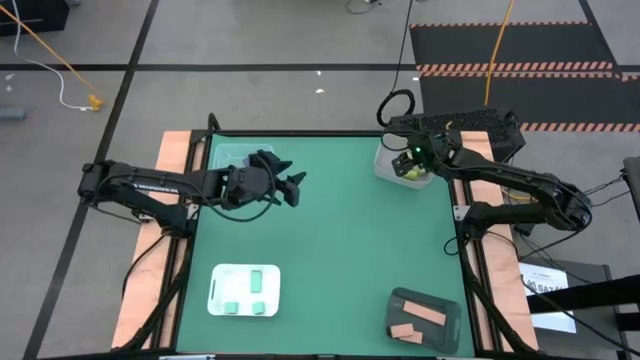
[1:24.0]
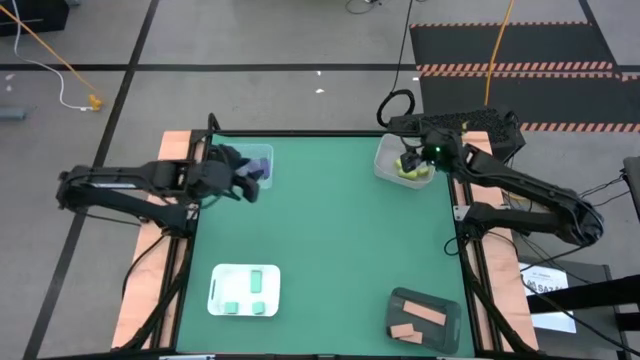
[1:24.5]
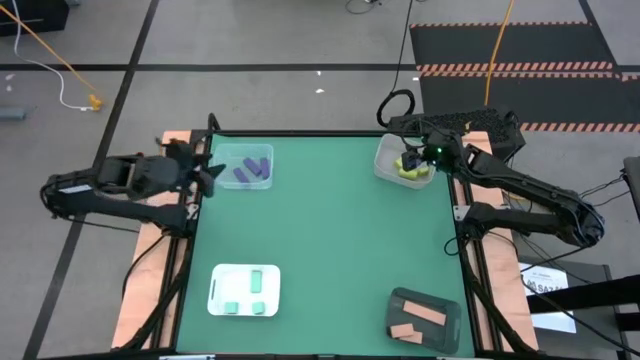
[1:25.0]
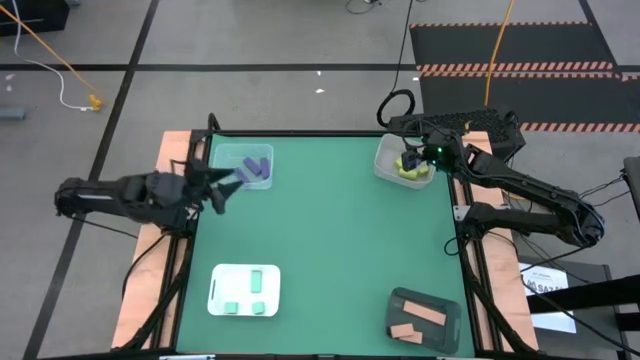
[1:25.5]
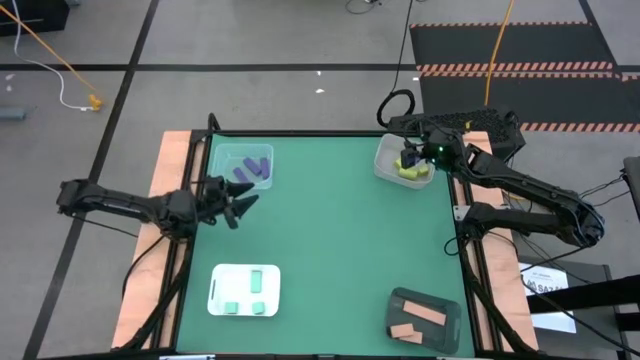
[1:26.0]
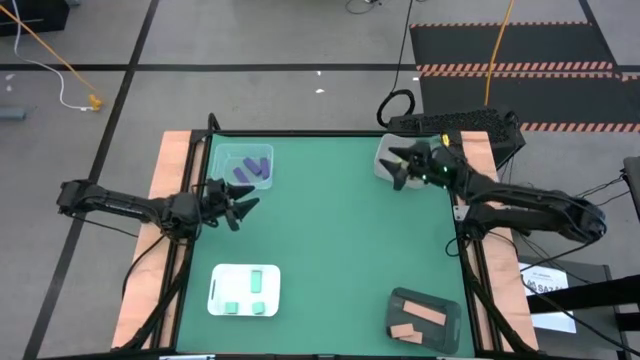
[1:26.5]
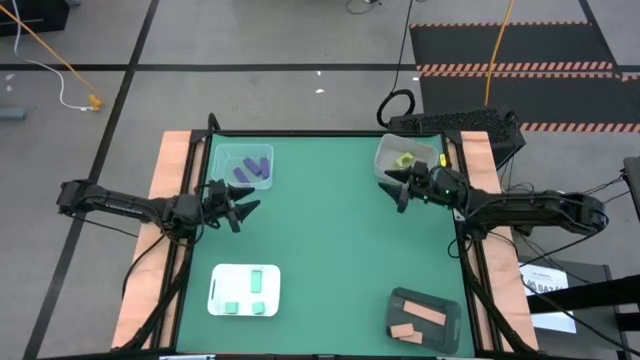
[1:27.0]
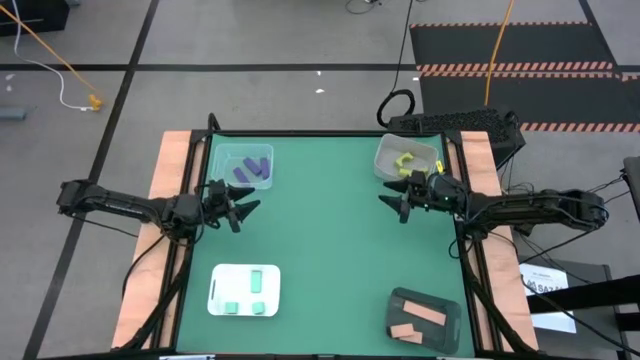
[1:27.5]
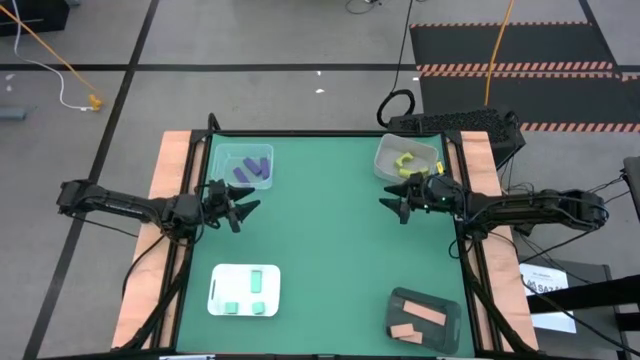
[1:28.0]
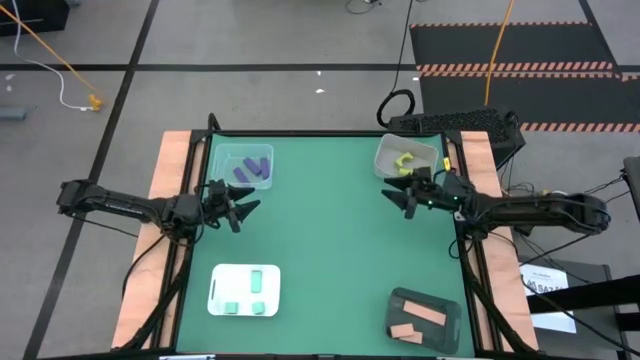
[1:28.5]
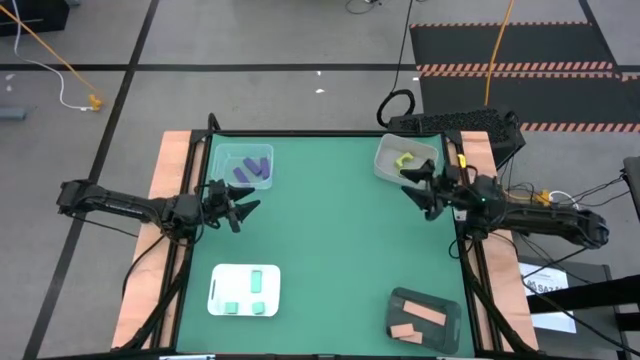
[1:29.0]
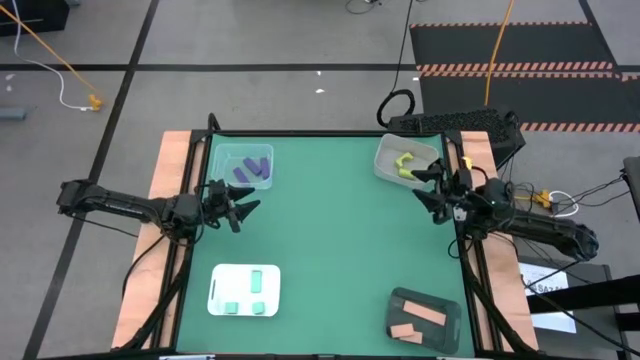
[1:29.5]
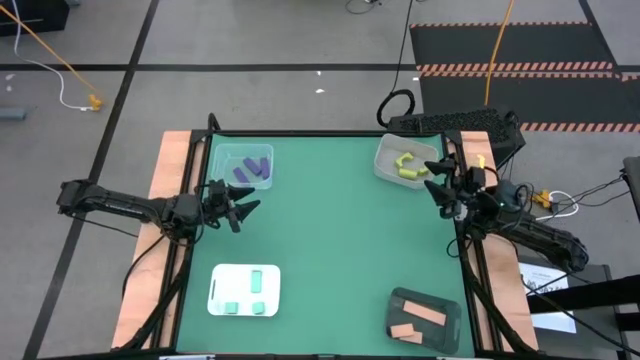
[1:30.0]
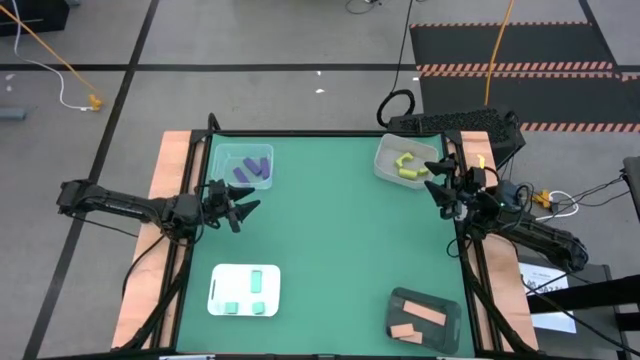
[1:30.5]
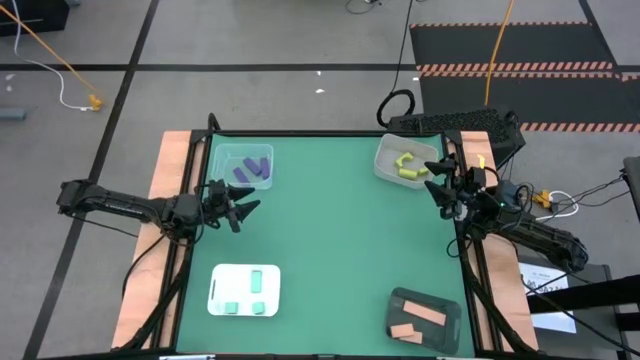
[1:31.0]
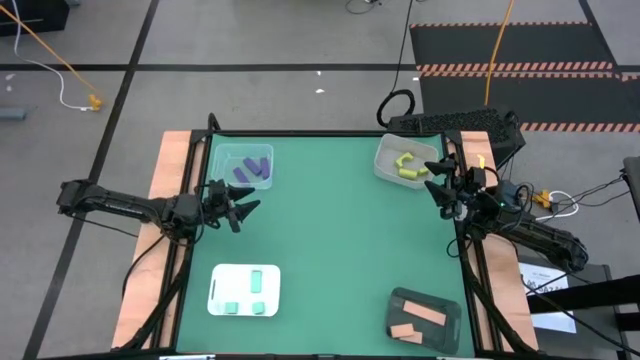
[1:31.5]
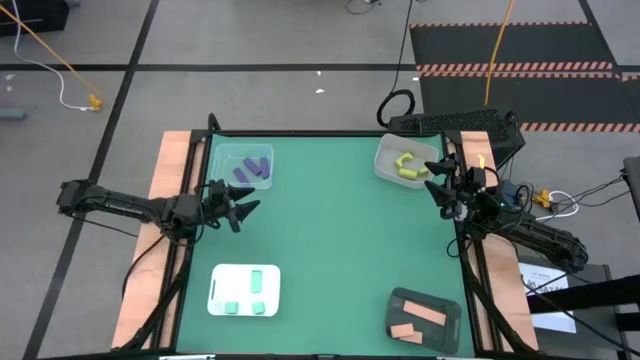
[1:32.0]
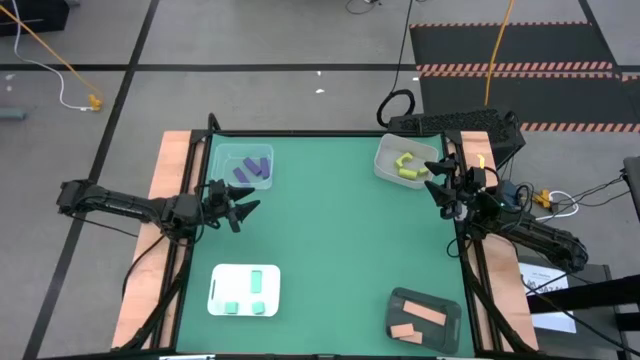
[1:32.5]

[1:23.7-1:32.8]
Task: Sort & place blocks by color
Return to Home Position

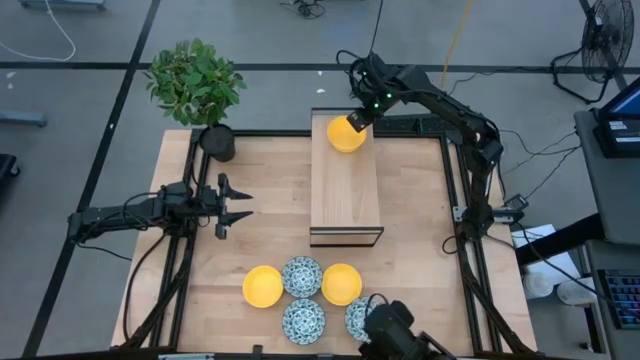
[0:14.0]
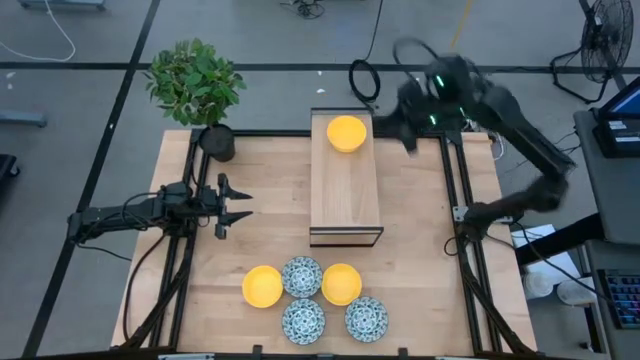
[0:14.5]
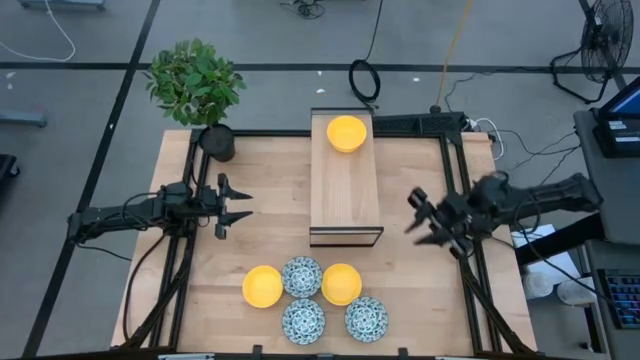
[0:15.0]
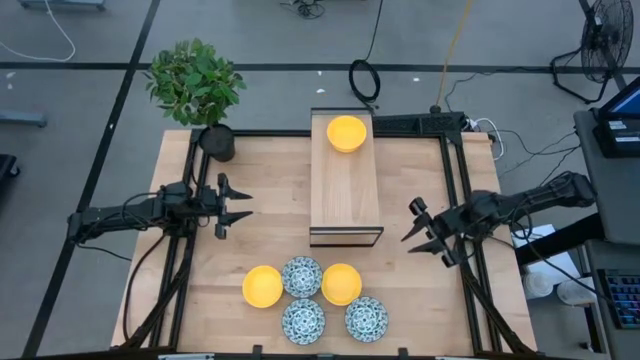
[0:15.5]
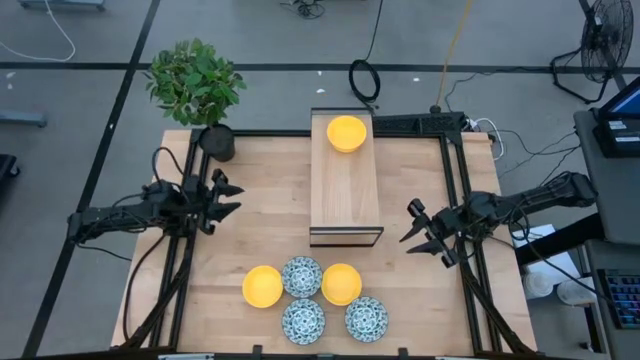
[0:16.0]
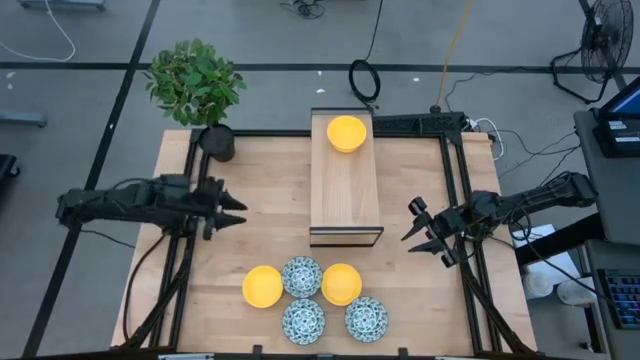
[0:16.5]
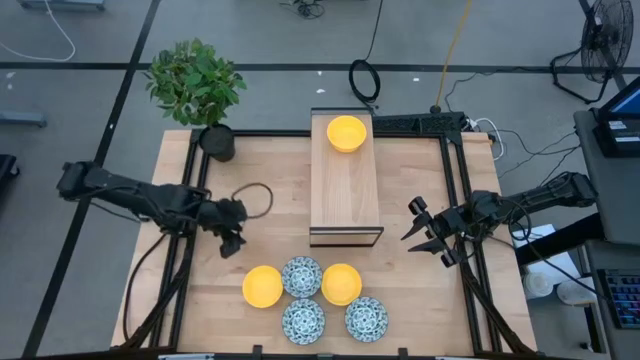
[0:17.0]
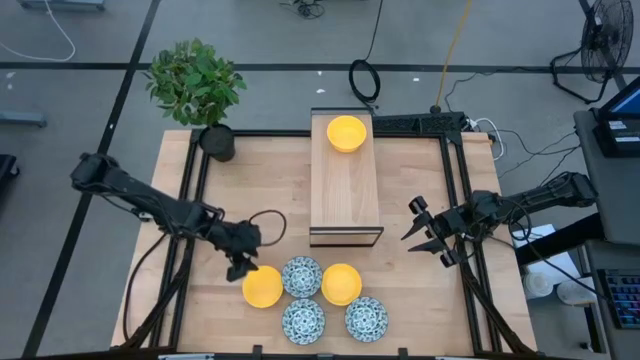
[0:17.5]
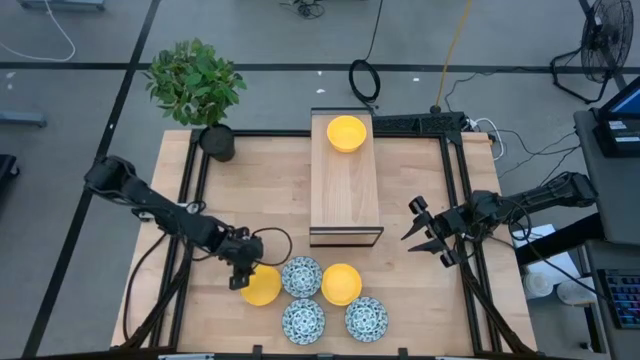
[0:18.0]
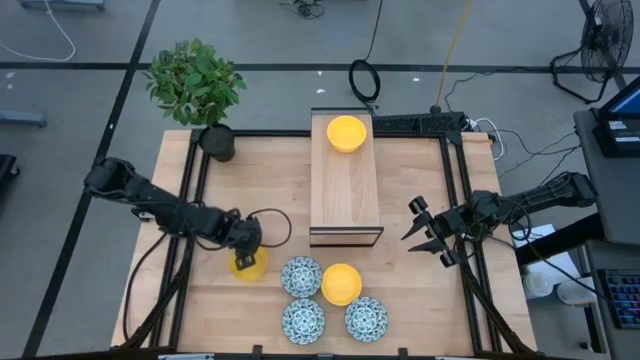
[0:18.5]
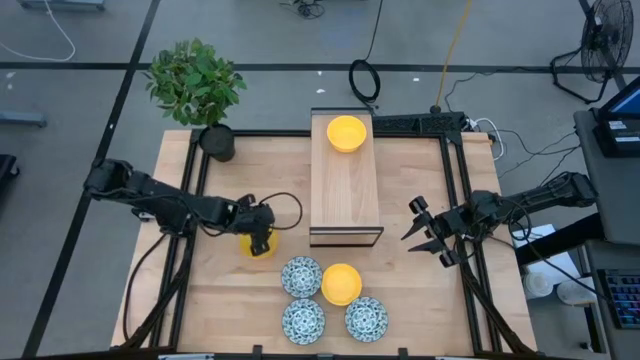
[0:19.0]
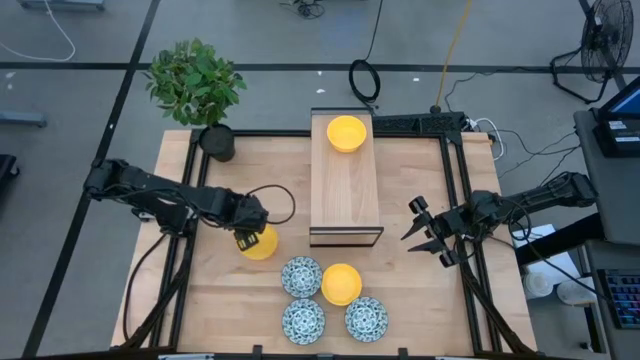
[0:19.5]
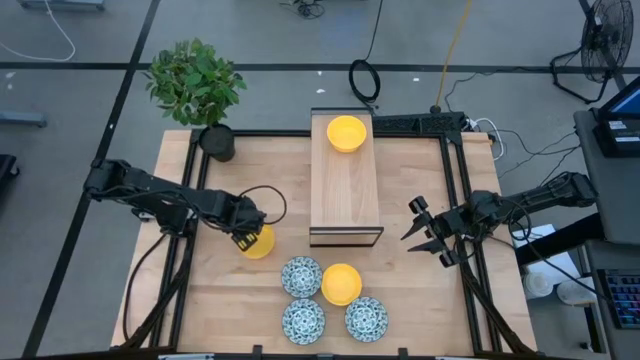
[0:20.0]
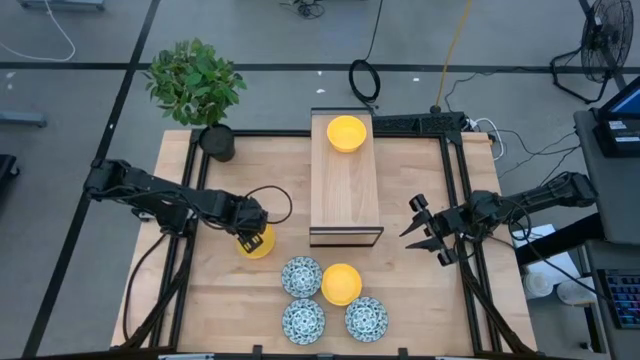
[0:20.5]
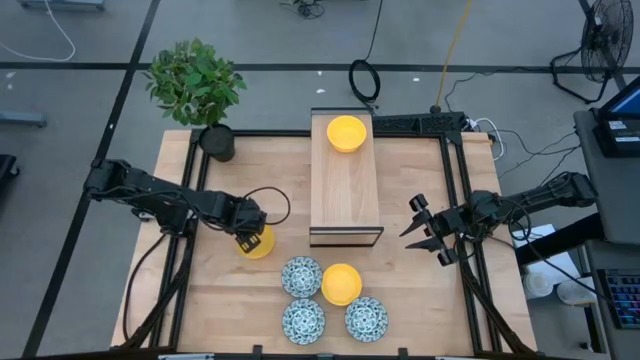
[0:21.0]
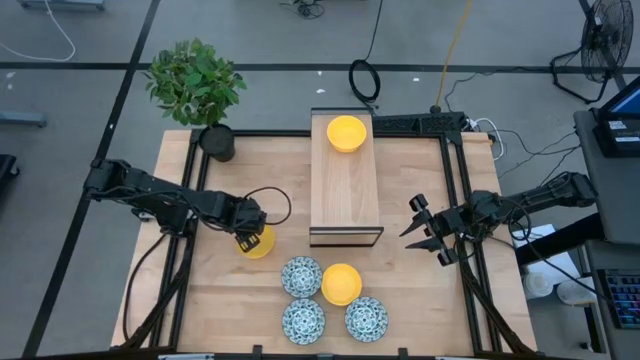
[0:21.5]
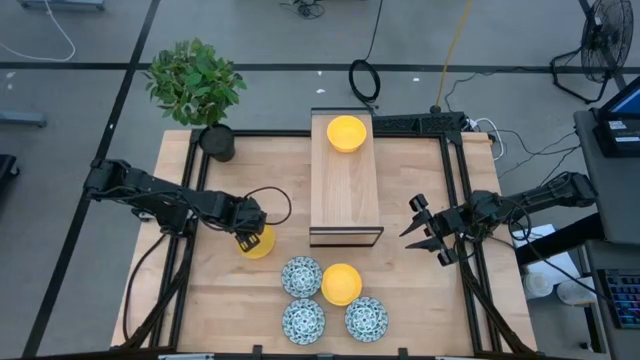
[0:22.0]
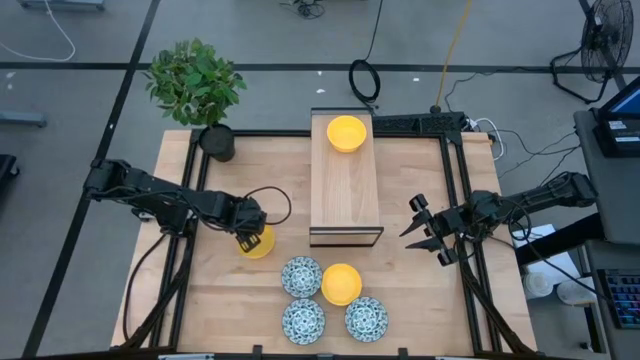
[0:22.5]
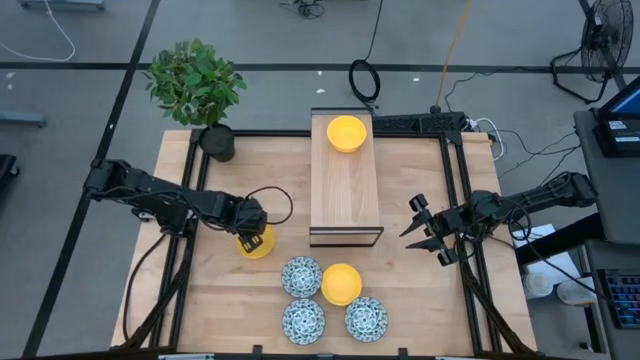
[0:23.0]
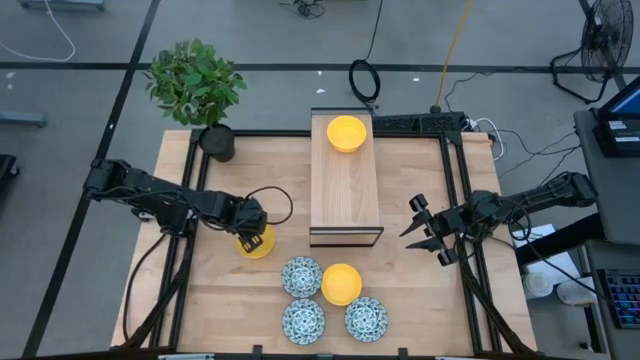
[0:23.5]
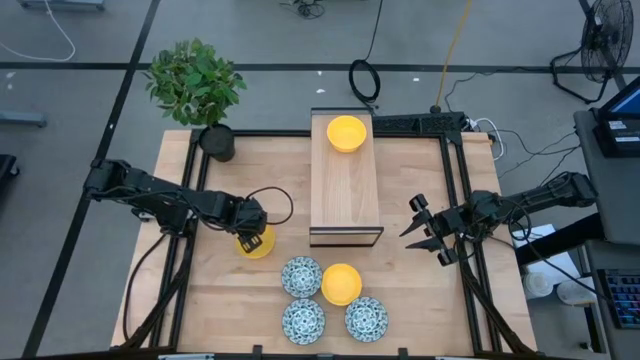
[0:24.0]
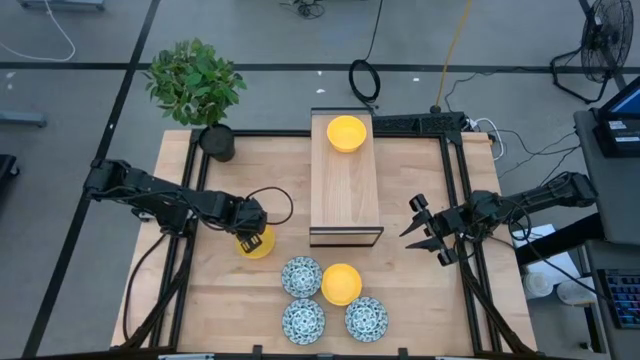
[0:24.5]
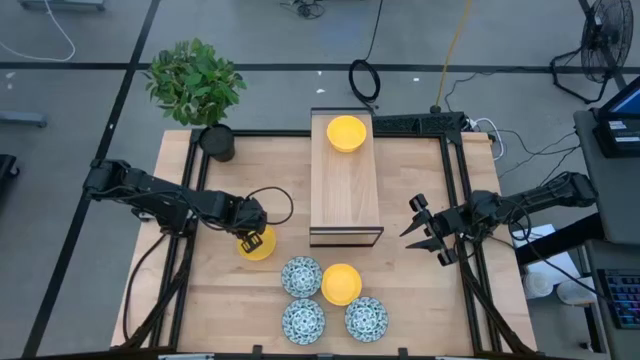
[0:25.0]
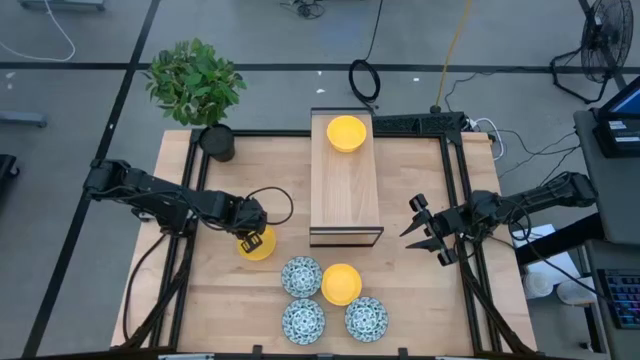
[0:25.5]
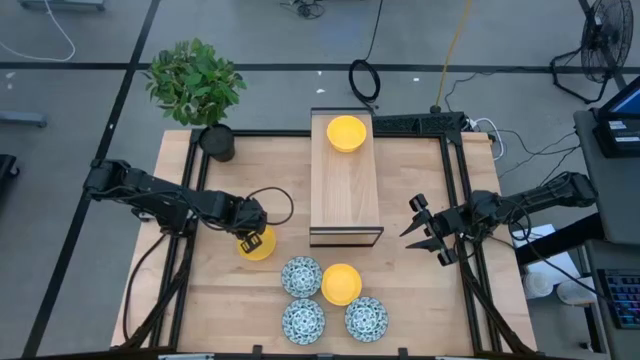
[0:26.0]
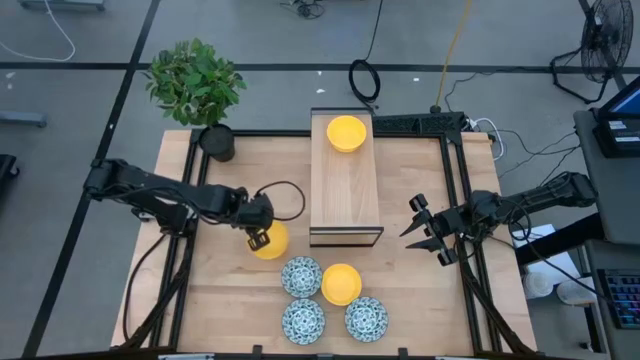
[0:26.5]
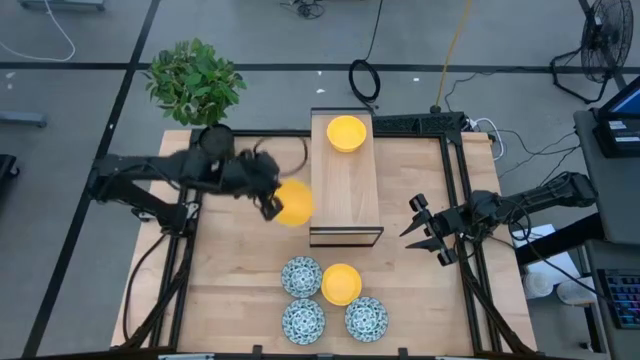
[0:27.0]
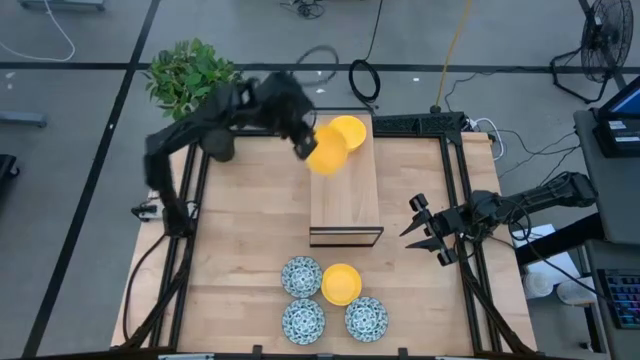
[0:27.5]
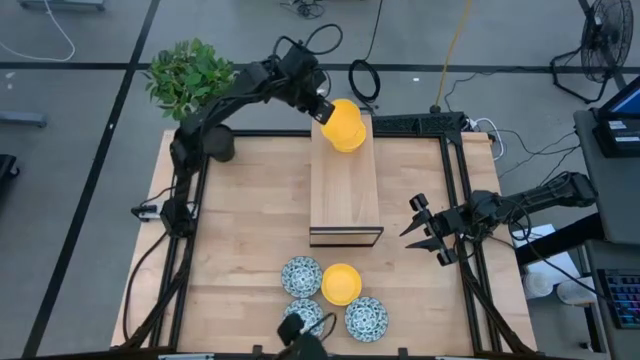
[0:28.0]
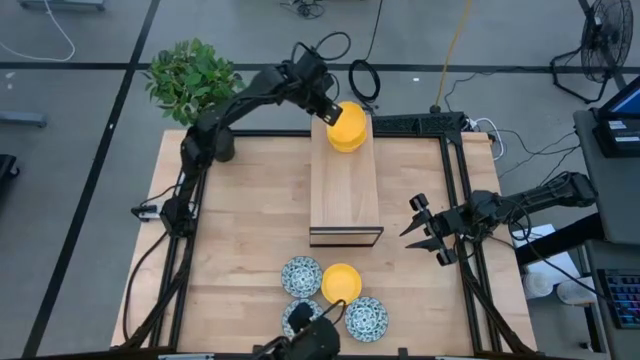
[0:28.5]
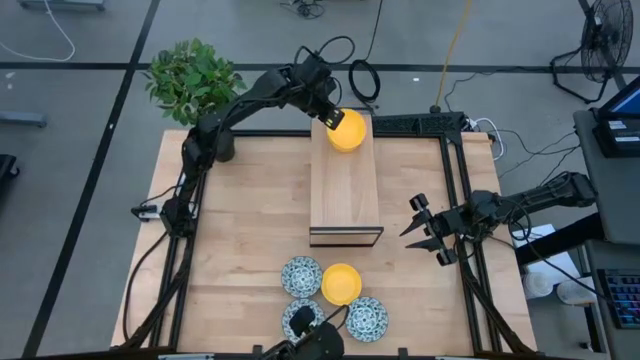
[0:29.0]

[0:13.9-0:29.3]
Task: Pick & Place Mini bowls
Stack the left yellow bowl on top of the yellow bowl on the shelf
